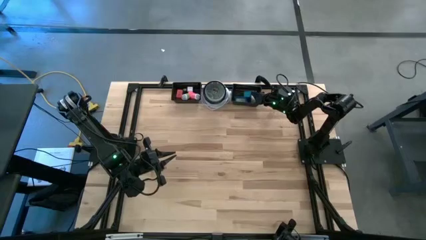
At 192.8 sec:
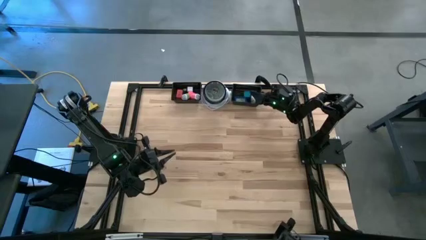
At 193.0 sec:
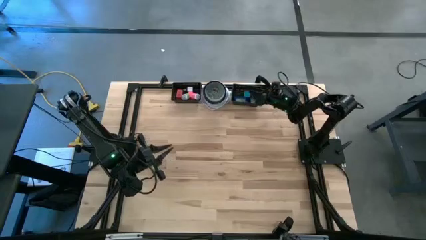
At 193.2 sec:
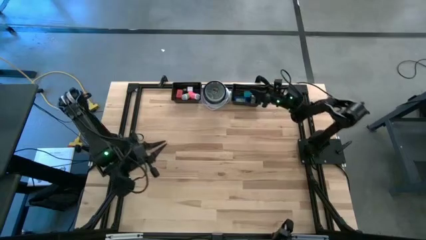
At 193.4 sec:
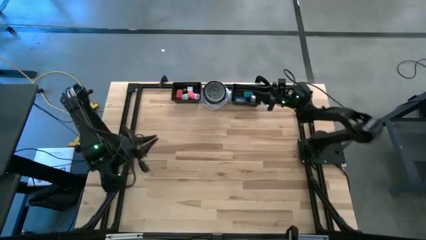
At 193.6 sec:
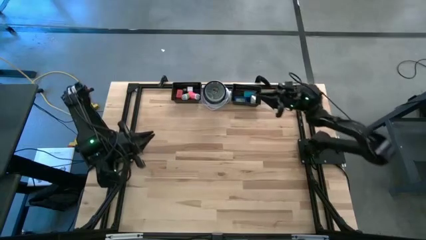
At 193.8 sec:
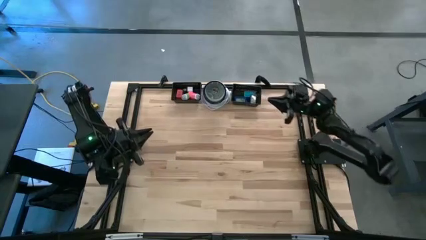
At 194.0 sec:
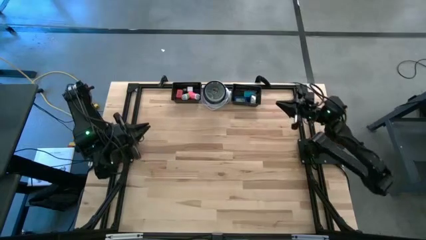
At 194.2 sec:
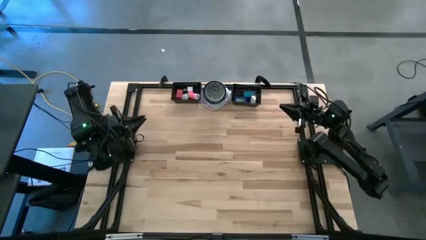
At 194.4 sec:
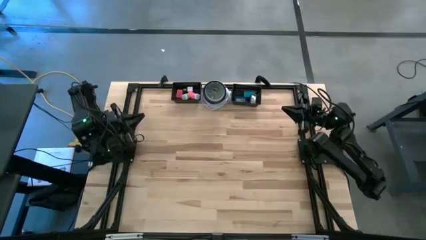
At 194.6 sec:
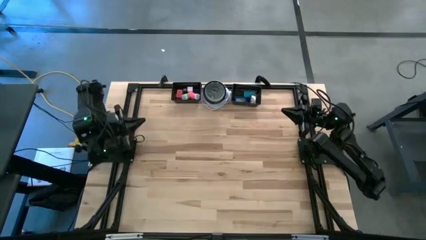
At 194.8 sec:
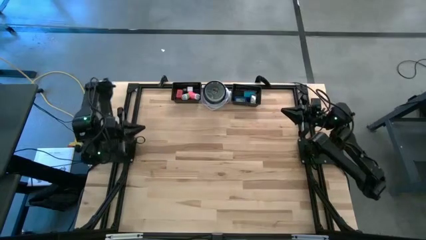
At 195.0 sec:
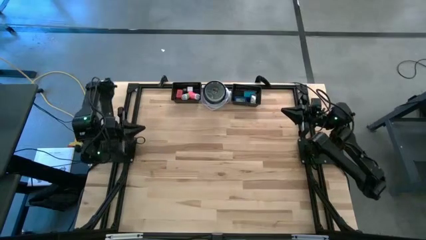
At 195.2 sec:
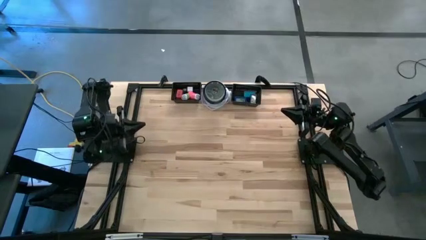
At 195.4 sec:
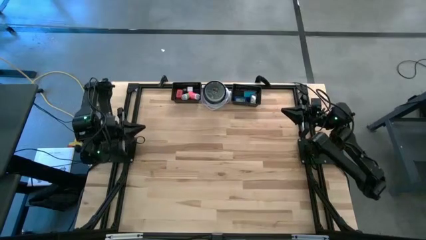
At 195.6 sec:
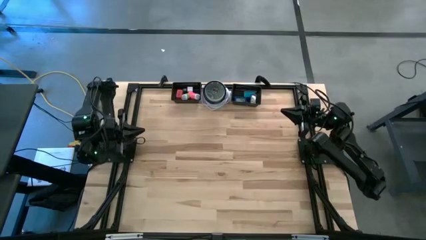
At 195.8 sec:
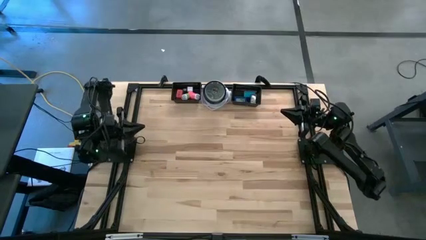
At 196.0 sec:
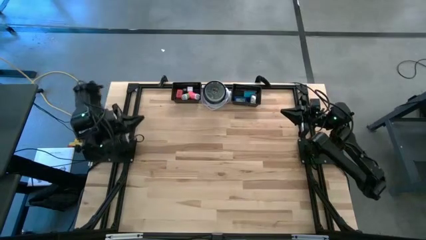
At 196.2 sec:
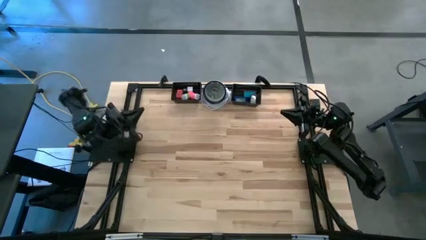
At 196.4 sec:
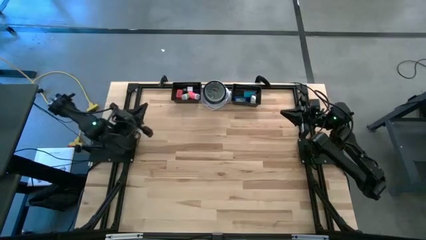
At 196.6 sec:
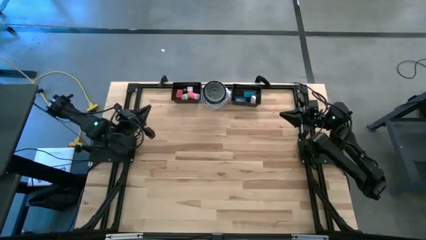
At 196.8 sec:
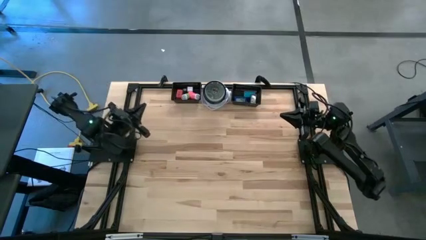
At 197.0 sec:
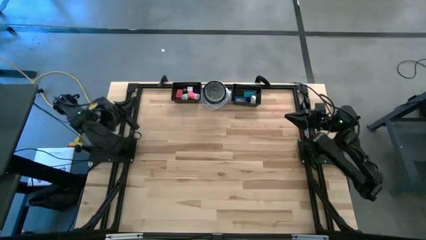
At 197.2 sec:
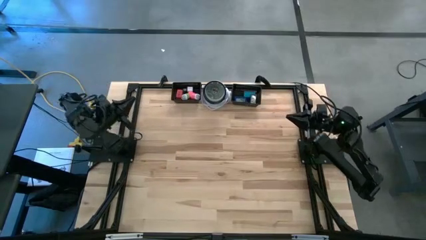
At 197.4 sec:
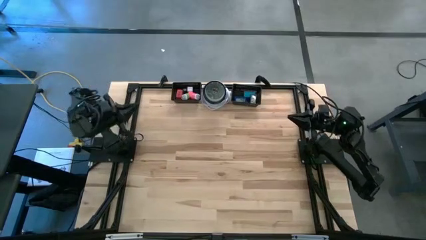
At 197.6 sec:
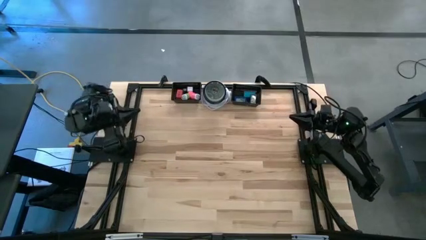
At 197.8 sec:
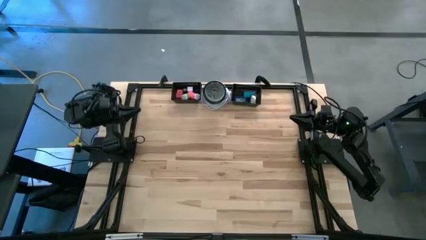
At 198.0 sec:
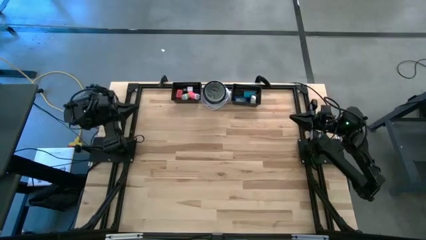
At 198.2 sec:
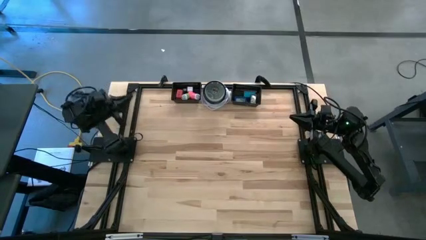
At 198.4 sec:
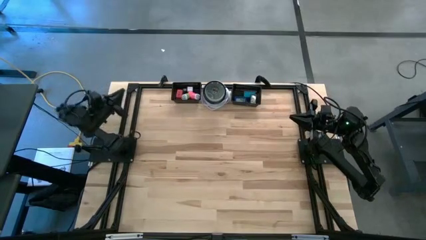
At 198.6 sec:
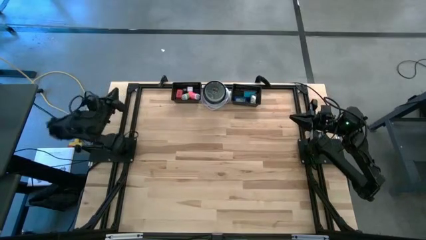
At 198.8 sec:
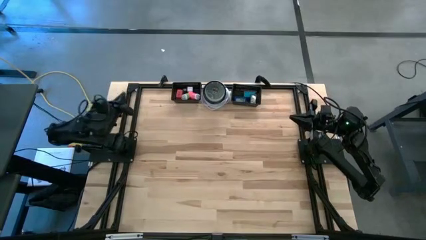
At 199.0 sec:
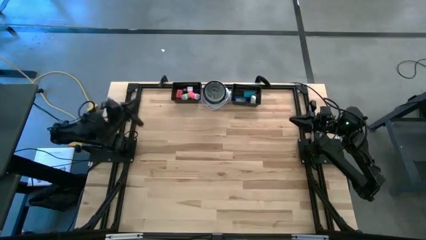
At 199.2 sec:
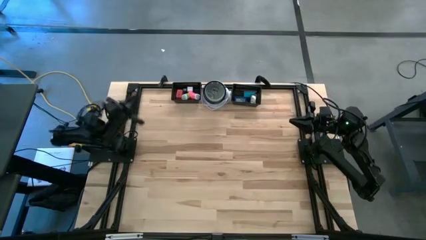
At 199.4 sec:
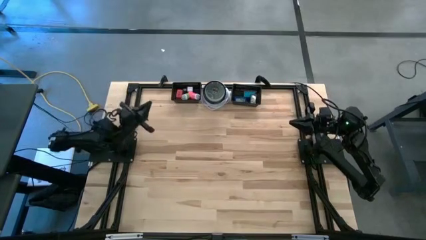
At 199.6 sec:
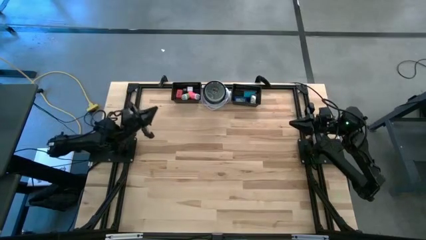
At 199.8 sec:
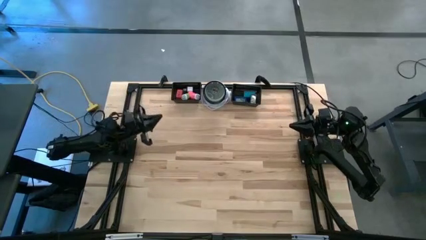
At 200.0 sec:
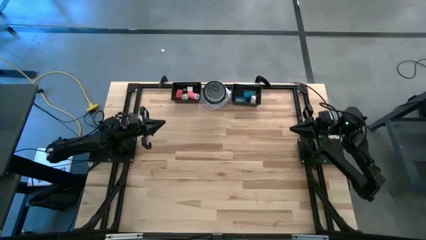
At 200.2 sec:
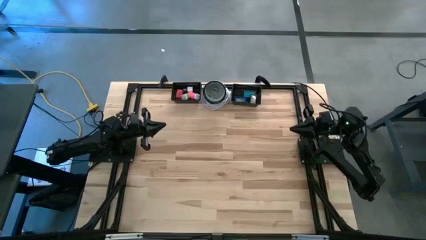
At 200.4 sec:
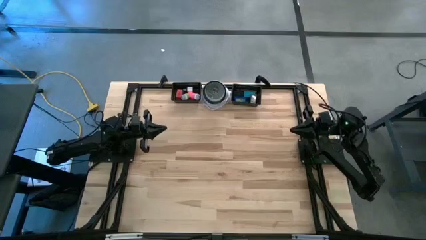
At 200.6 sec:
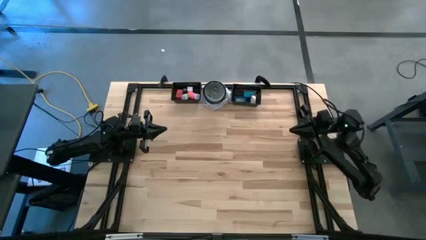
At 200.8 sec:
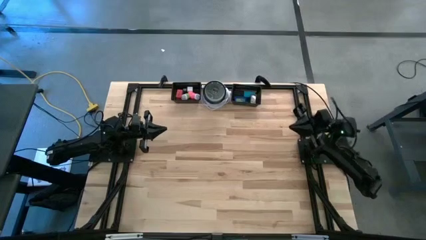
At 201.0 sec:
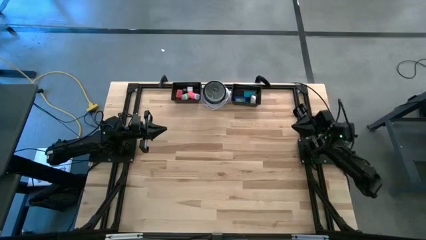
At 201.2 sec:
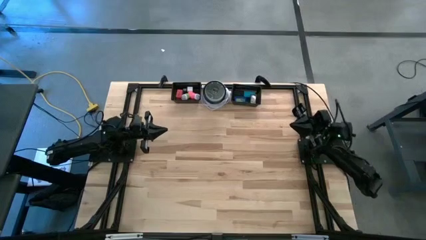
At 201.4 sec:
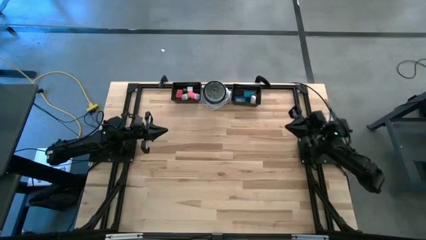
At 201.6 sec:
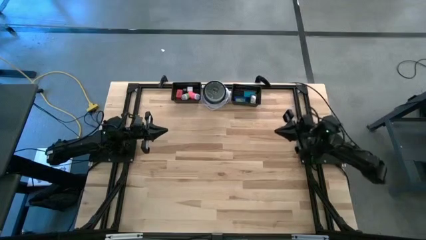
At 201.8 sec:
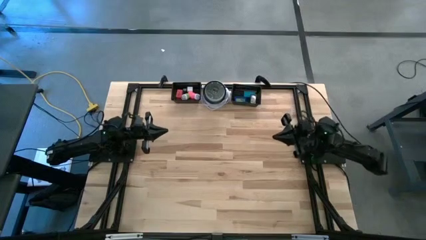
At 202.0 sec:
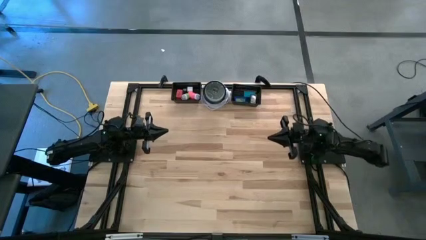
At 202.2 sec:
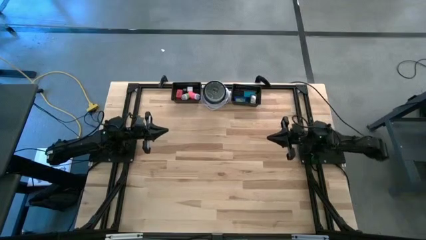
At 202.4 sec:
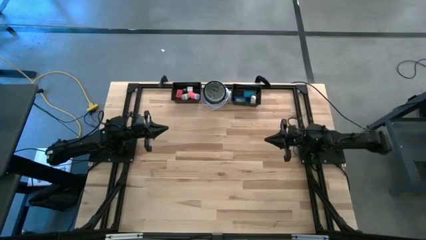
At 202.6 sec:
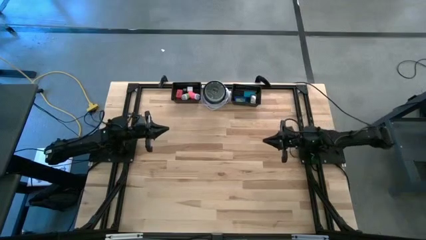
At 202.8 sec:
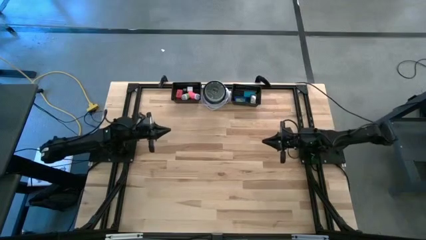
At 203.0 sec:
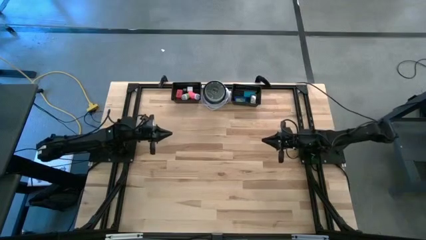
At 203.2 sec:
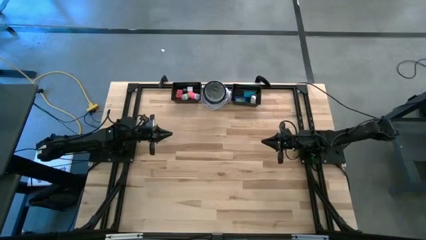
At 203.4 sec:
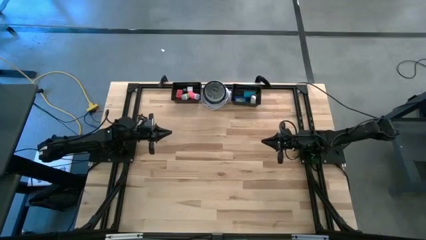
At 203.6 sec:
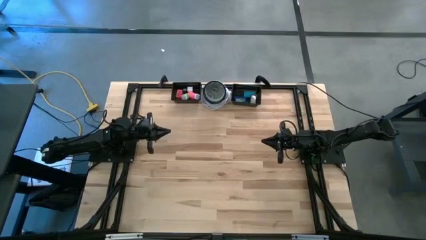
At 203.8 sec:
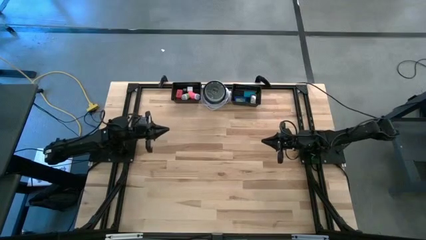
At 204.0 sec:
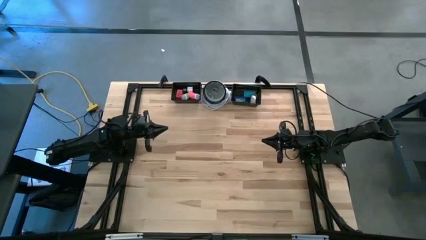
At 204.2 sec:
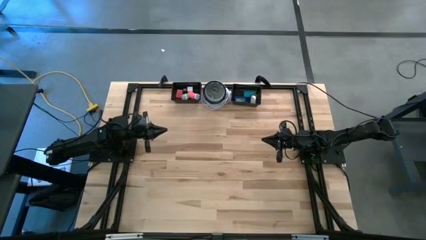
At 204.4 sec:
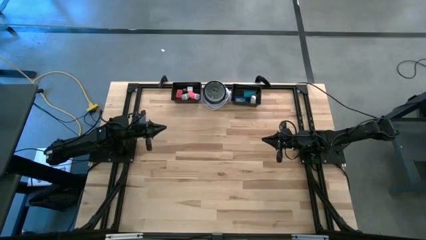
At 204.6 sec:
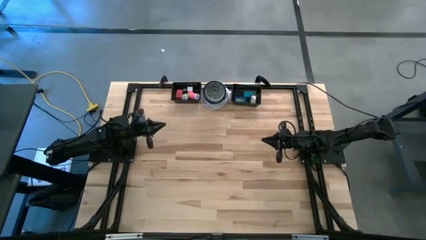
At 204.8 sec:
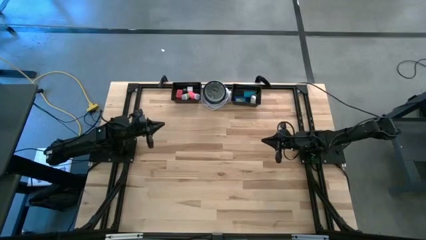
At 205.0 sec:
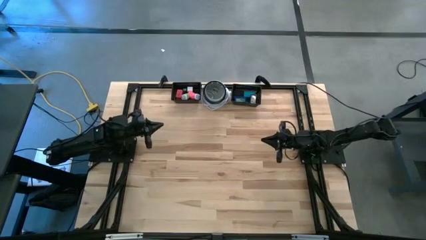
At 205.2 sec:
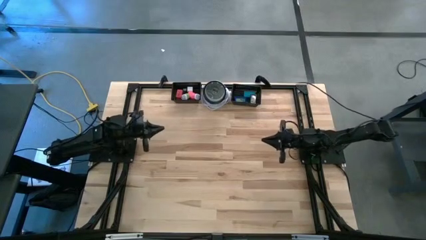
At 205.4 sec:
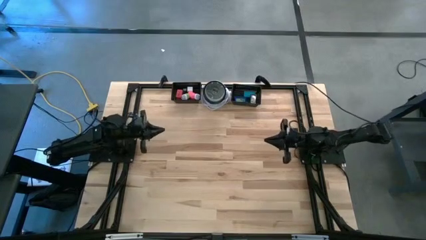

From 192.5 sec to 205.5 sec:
Task: Pick & Place Office items
Return to Home Position
